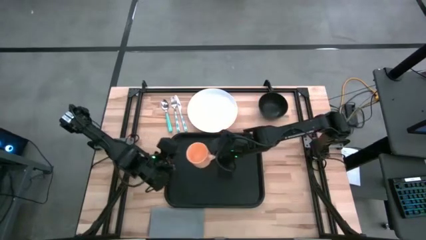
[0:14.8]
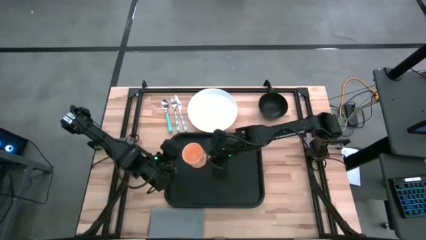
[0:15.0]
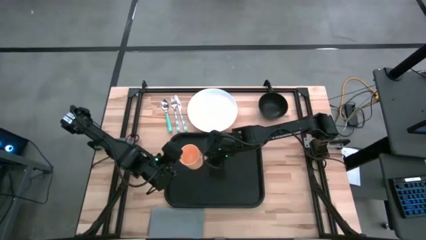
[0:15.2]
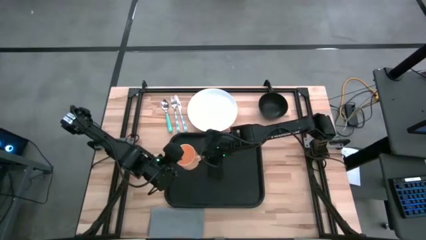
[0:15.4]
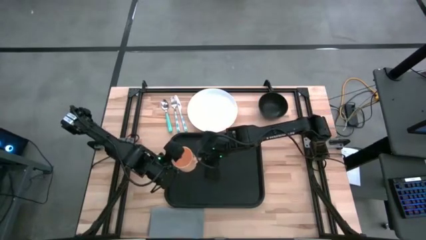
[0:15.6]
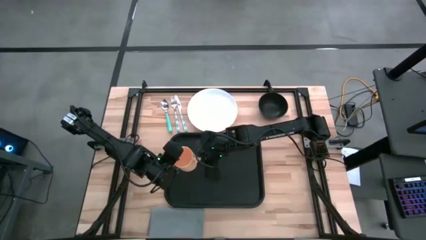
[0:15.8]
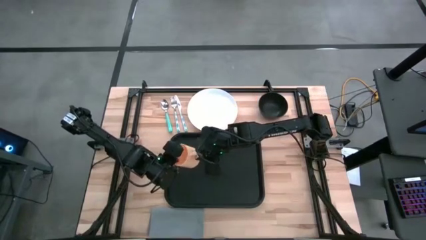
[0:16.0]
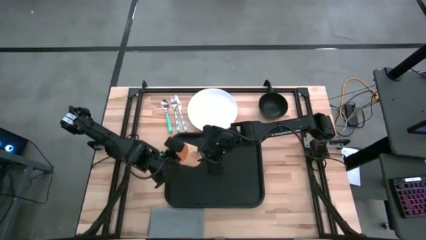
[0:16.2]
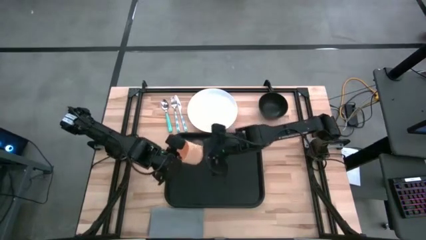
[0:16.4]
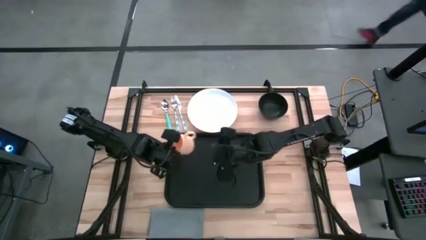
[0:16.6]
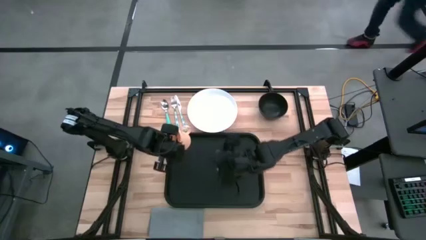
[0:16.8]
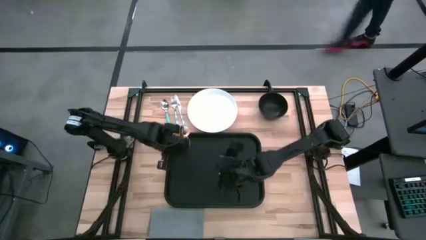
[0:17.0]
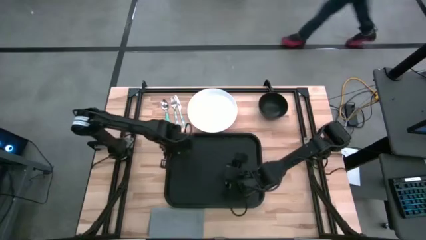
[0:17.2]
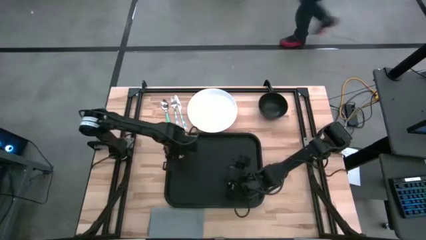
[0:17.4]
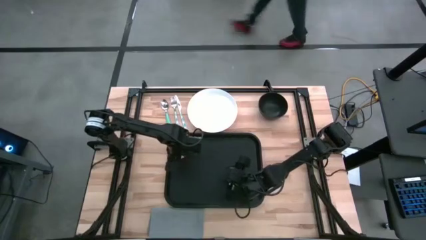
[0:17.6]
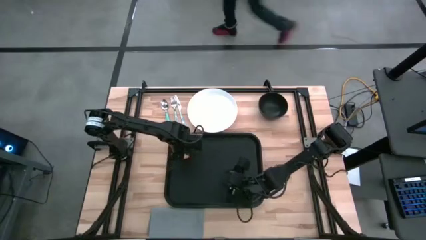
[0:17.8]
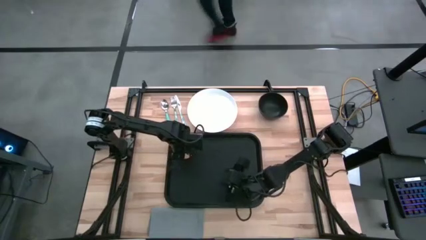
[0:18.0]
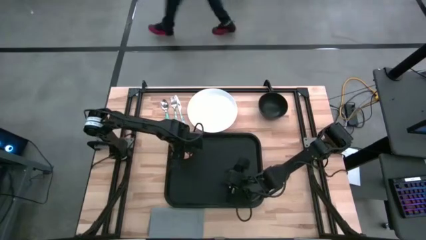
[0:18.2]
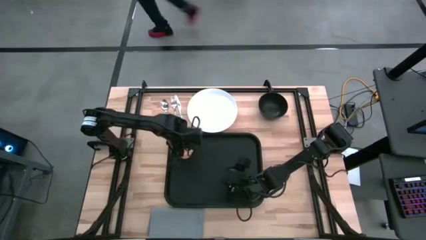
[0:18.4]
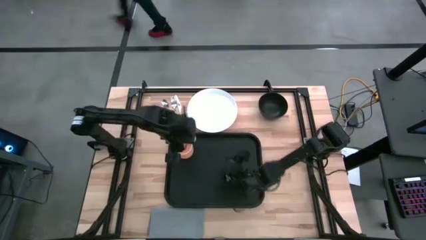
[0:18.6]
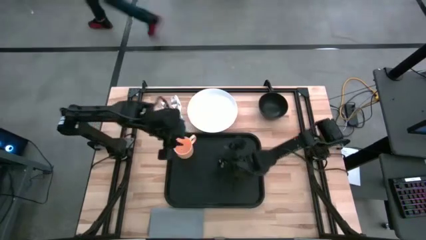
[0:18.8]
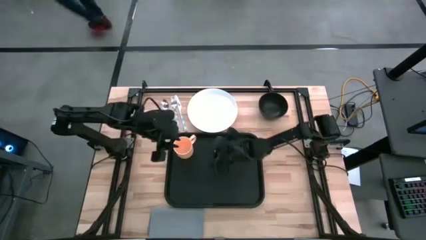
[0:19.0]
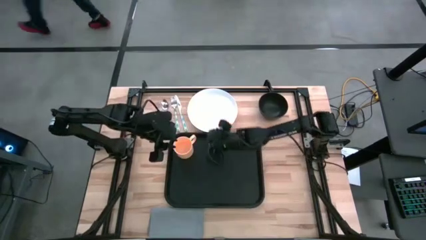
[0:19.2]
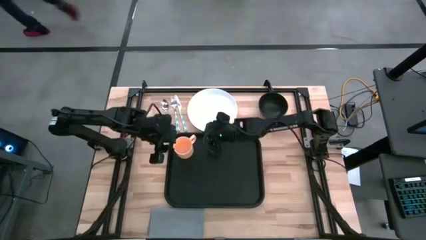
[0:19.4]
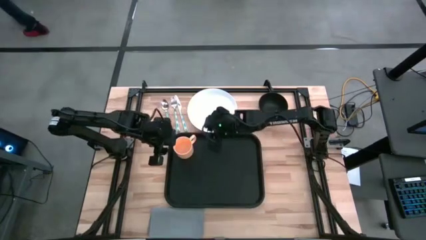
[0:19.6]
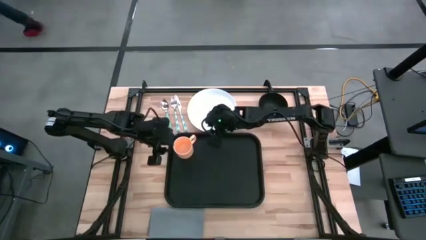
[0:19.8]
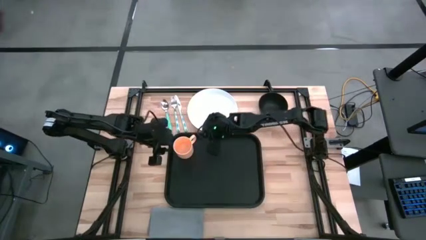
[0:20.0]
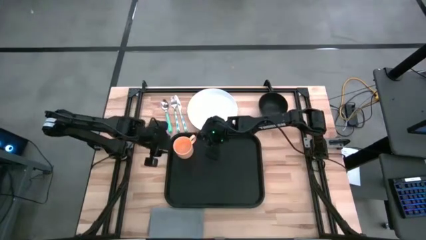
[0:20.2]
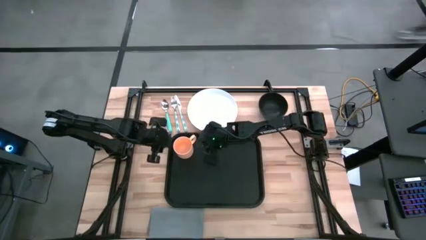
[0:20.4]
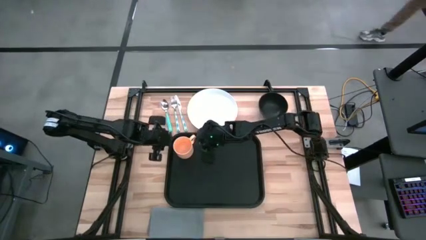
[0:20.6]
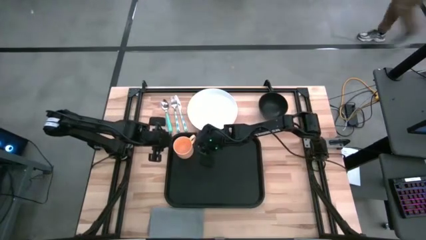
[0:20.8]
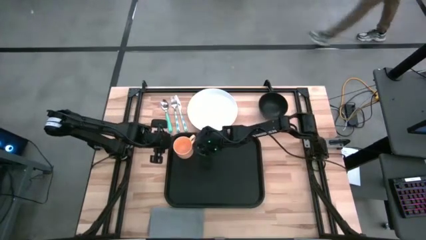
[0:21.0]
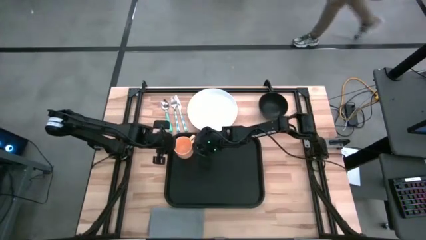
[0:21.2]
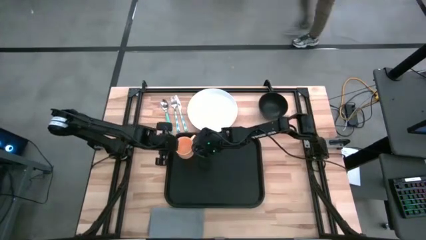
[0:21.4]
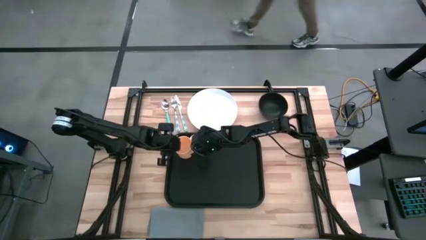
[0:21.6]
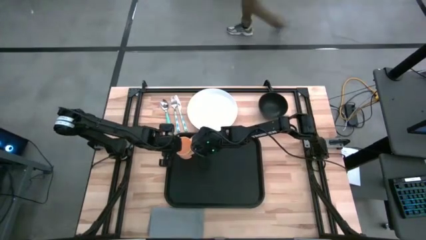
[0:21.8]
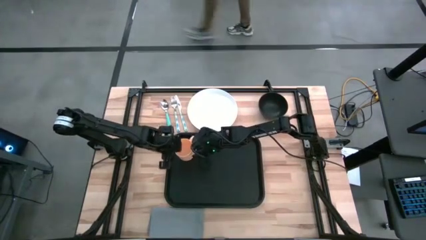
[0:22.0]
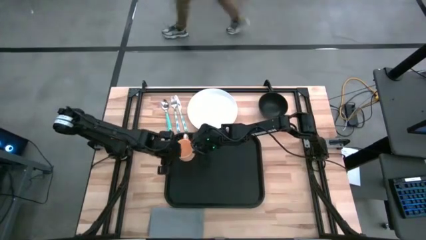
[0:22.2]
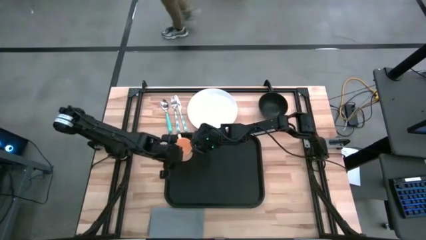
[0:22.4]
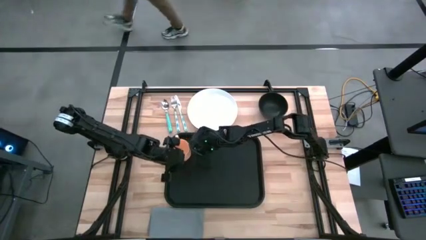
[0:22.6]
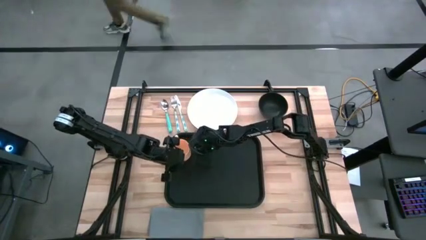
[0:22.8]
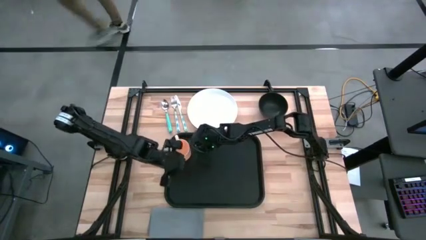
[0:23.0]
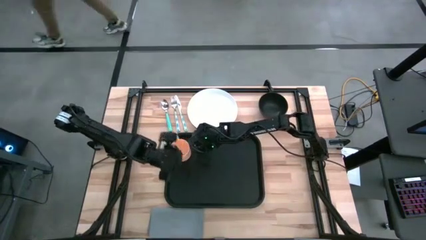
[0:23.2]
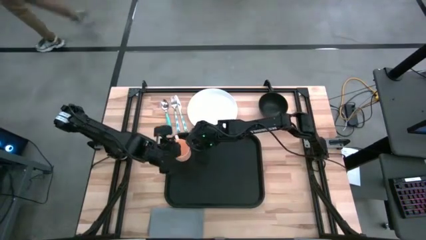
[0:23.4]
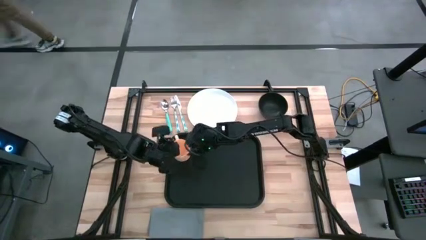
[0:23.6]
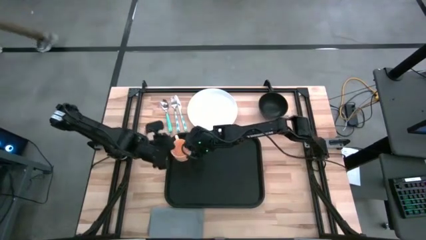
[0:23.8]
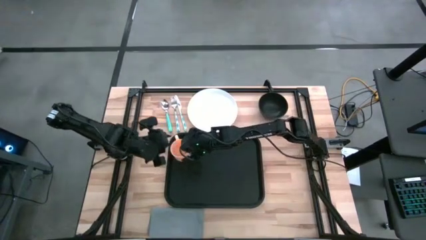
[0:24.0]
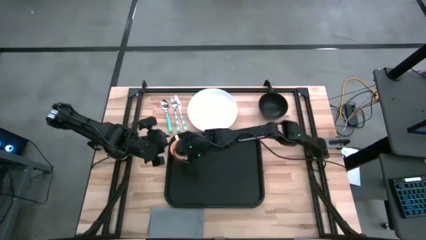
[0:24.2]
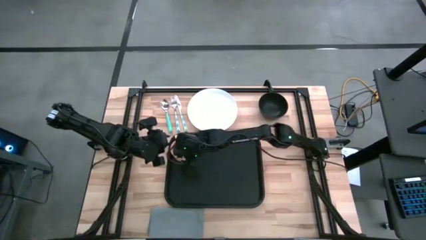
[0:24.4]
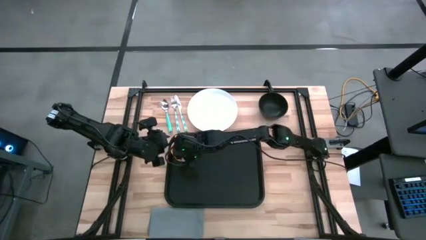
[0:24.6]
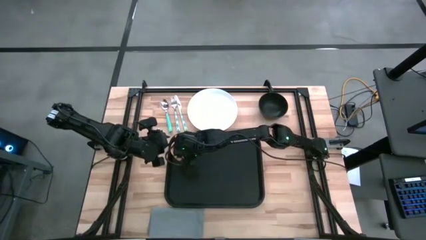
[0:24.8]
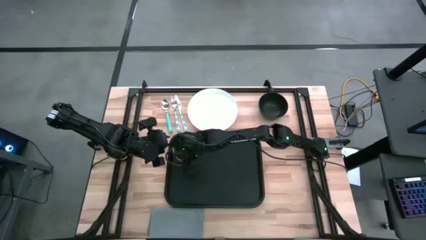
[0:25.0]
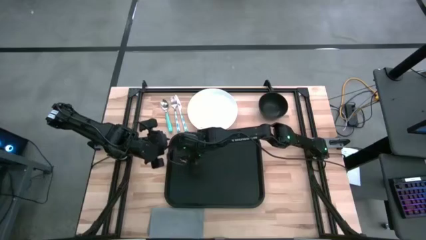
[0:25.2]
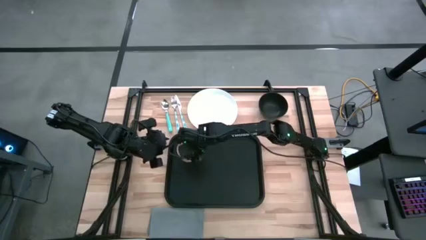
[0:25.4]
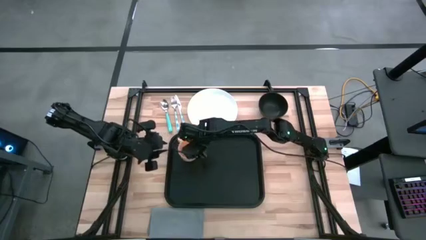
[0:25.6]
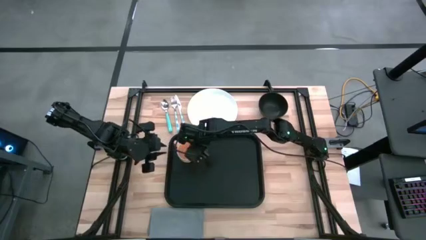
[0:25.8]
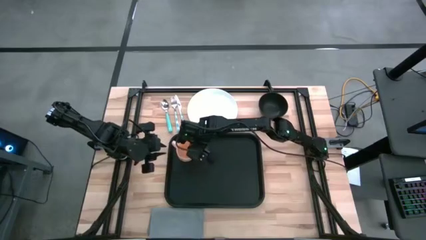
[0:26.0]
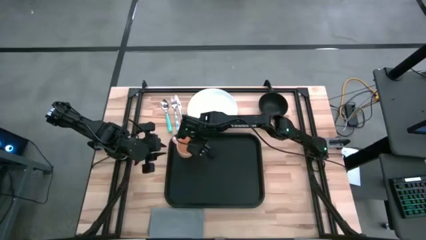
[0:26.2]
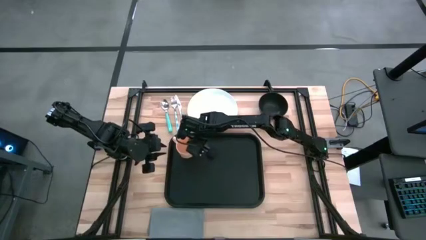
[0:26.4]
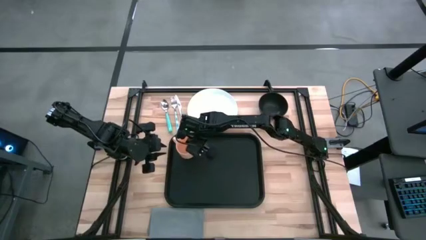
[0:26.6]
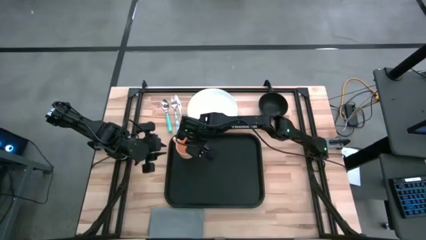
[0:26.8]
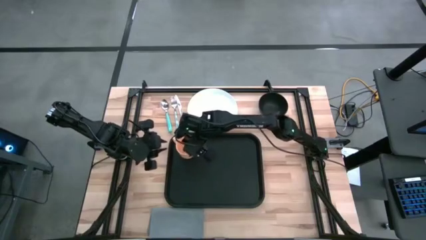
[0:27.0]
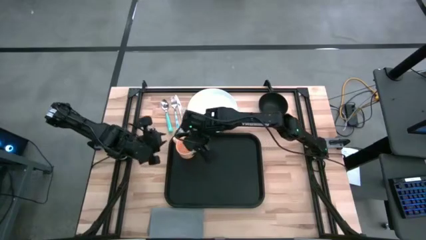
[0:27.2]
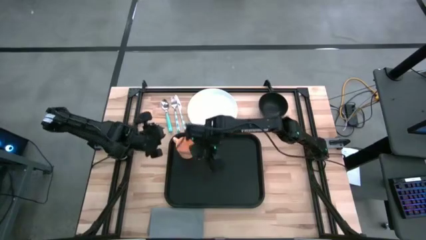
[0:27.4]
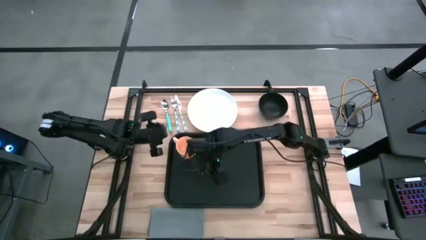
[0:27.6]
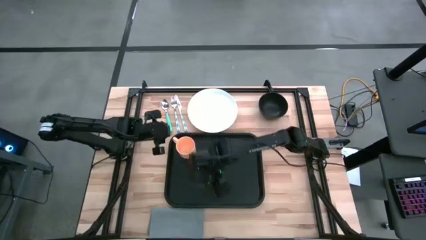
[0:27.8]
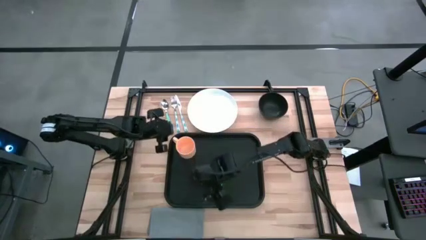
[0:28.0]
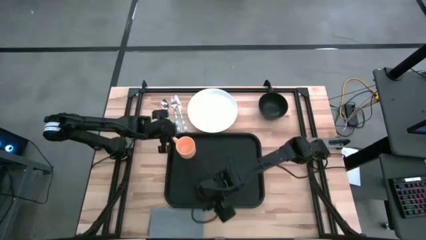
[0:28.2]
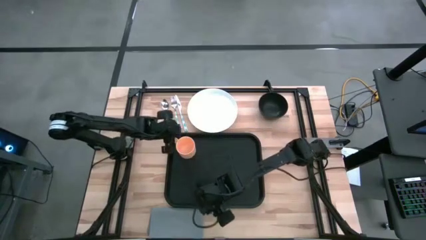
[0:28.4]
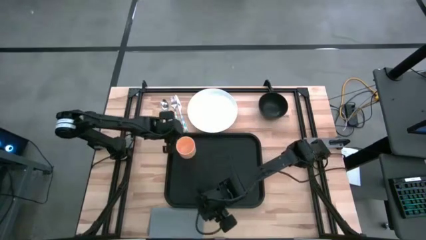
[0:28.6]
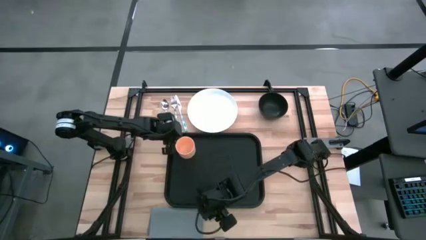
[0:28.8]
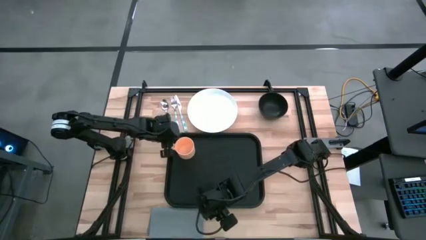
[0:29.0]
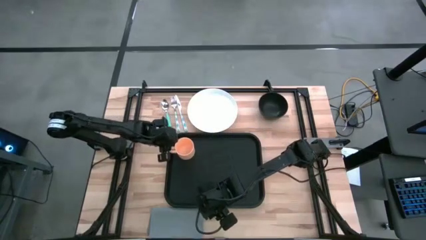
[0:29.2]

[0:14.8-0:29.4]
Task: Set up tray
Put the orange mug on the black serving tray
